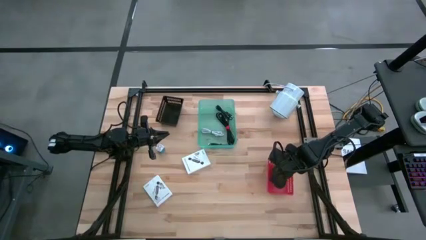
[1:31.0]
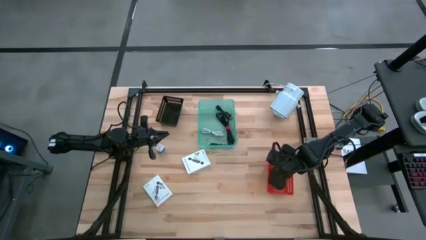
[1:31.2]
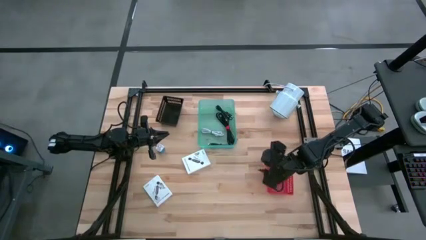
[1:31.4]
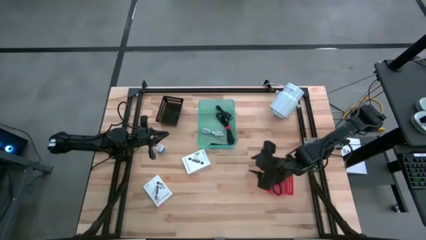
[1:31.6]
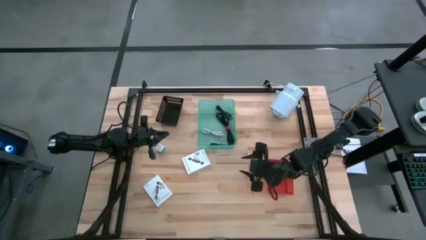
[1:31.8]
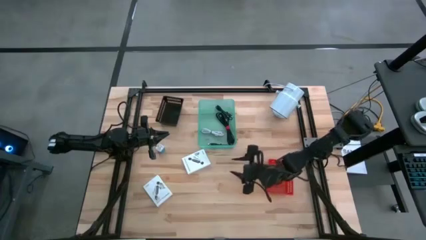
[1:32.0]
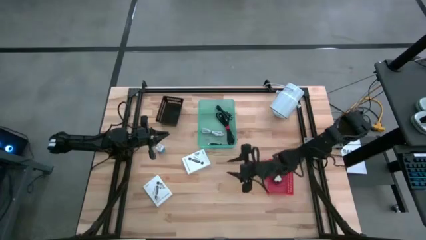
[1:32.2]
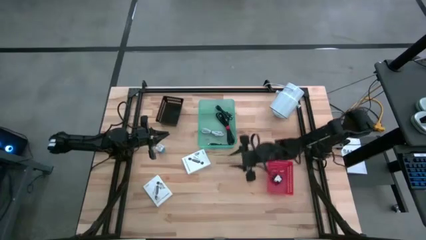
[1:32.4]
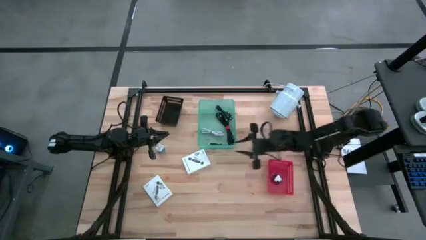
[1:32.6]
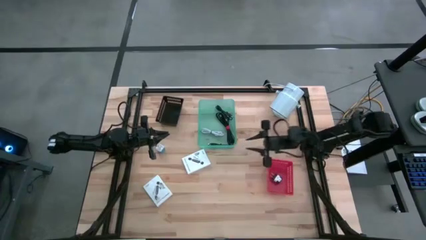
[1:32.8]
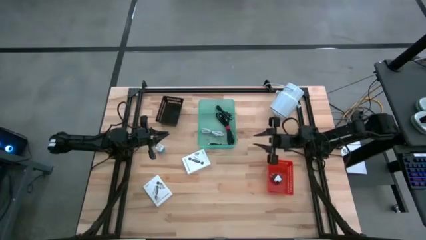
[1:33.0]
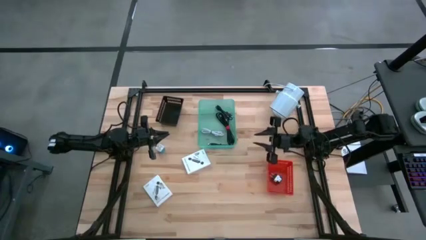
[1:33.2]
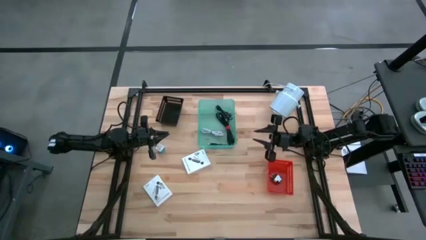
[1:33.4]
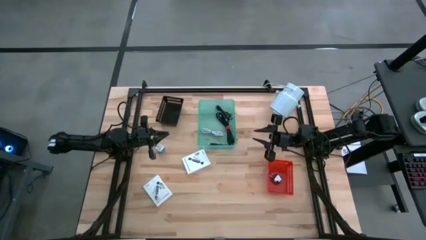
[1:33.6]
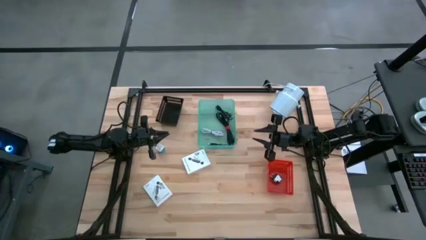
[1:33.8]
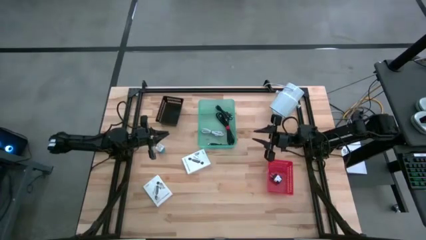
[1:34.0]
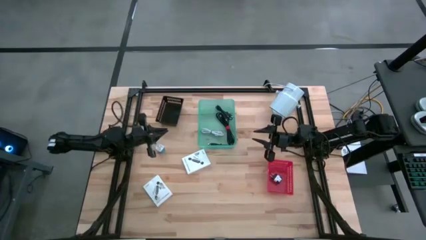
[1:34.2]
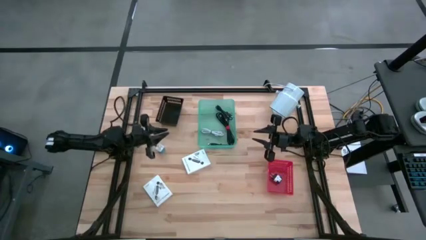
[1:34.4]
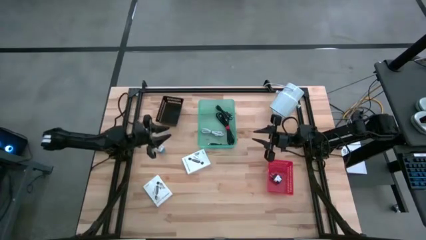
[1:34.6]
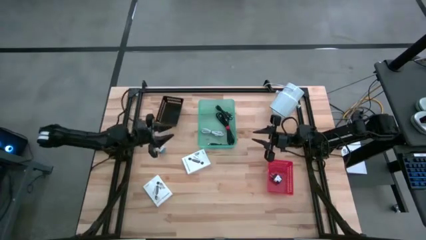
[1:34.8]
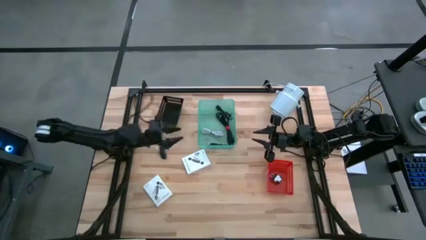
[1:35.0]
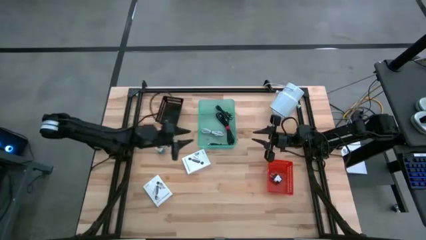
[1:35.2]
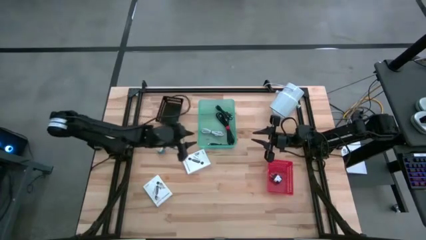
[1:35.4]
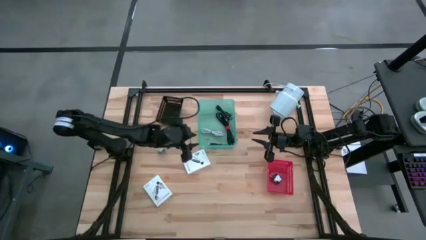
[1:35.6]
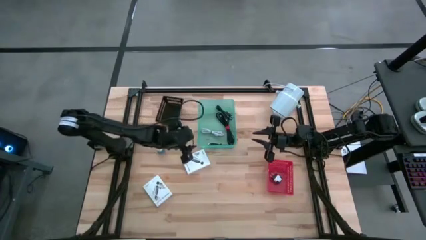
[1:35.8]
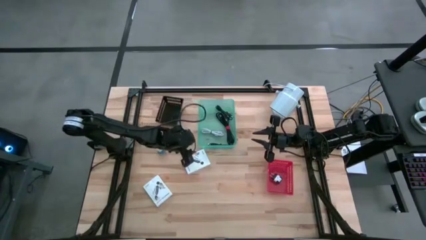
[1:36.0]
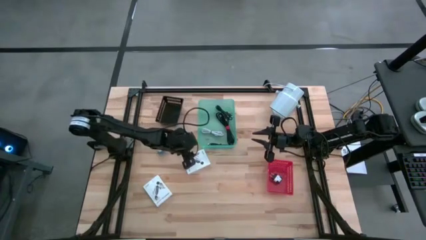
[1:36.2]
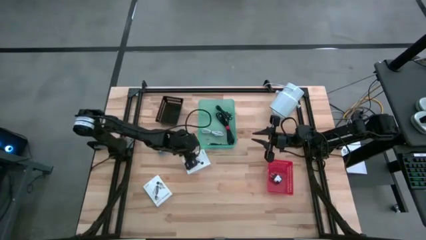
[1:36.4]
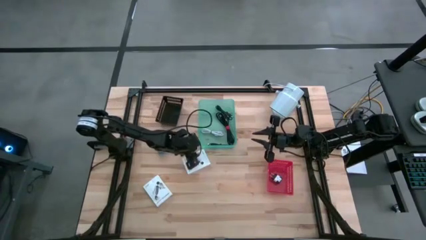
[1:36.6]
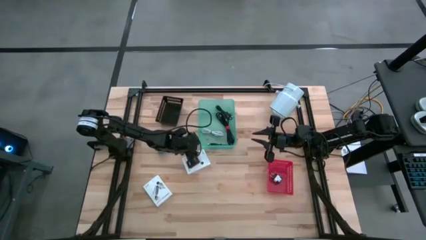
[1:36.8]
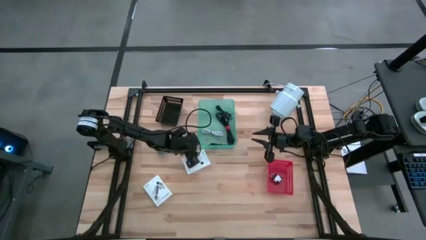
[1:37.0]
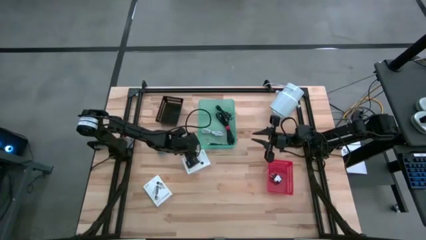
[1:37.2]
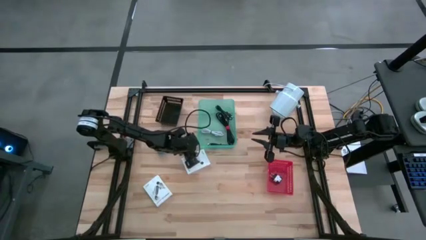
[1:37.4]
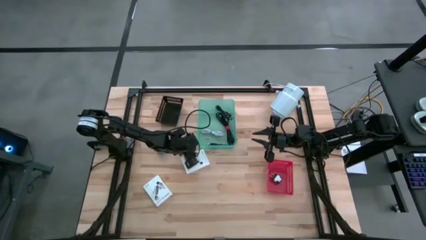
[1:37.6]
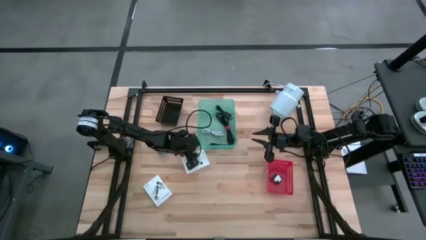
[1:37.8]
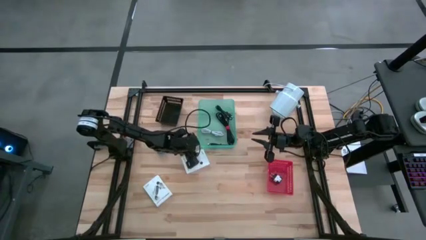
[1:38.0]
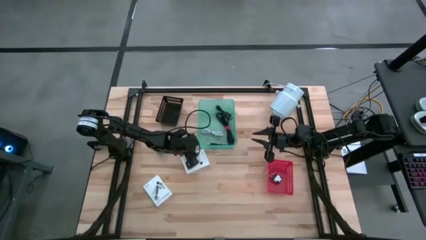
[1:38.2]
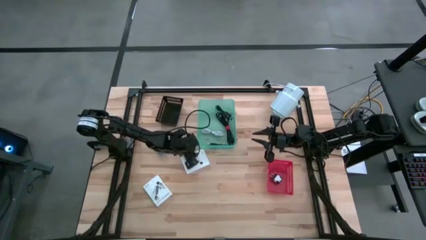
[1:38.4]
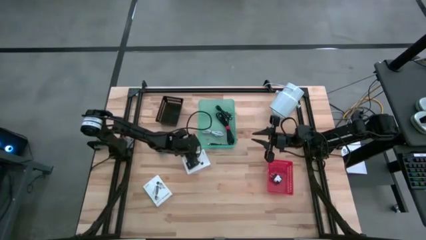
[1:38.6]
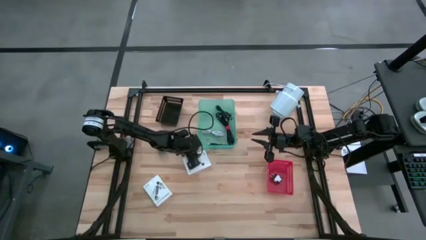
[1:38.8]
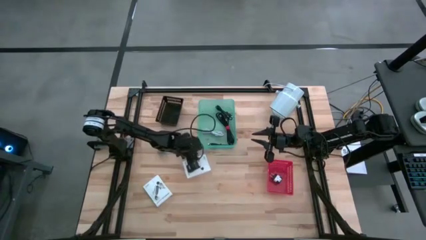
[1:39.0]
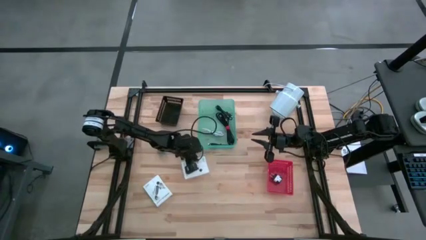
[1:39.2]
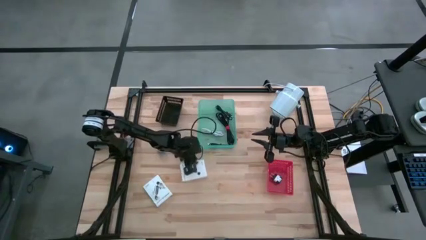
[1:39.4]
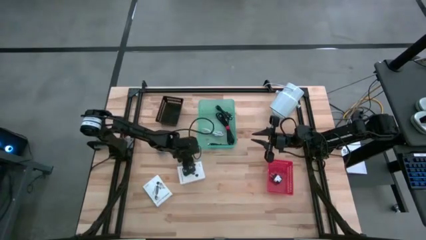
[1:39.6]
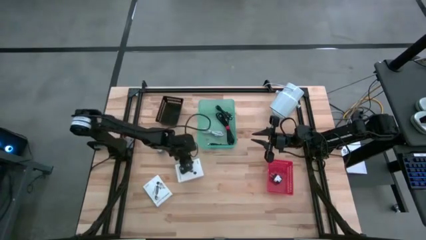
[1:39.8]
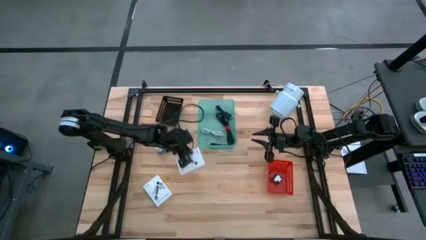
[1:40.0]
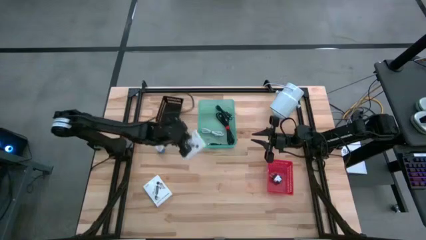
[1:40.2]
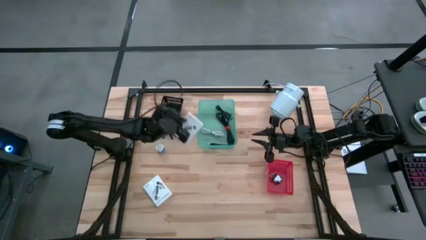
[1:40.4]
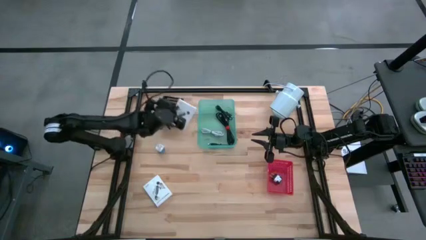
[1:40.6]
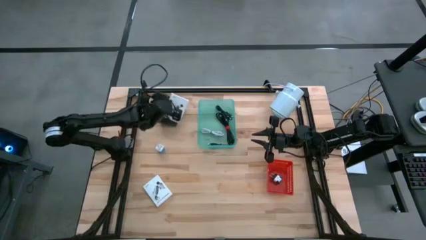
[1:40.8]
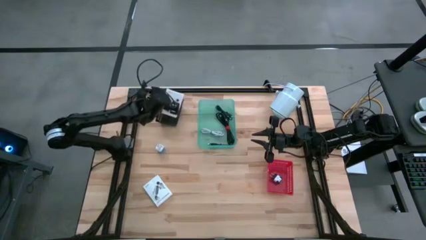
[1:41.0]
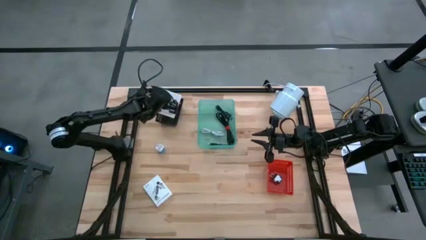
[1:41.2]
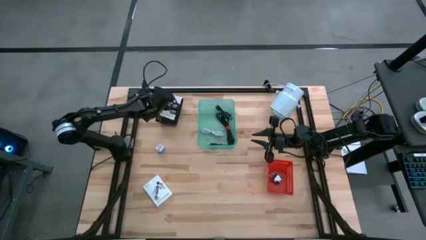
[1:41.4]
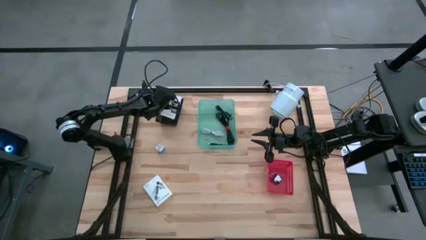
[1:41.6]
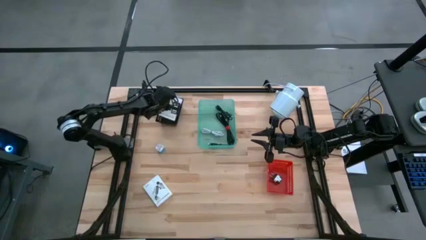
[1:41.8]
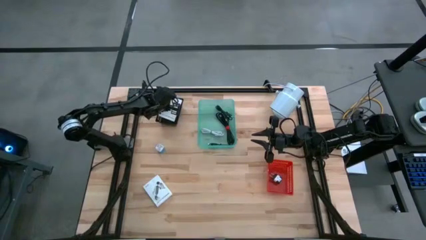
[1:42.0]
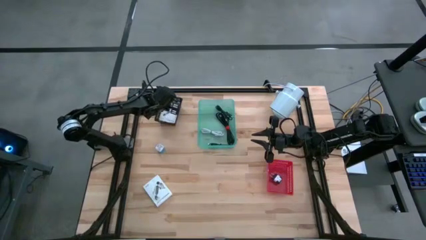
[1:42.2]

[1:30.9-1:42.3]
Task: Pick and place items into bin
Put the top white card reader box into the black bin

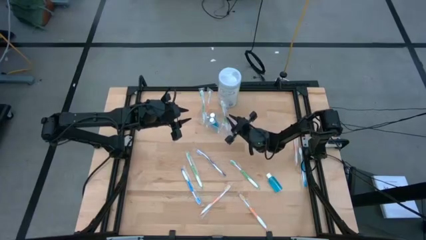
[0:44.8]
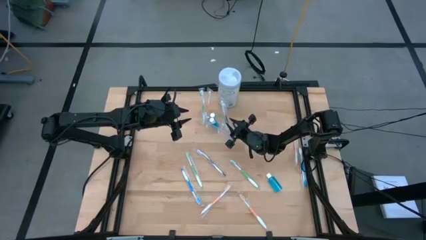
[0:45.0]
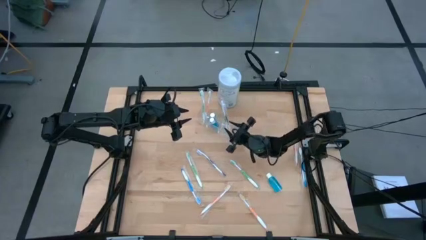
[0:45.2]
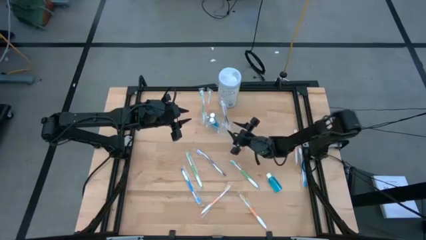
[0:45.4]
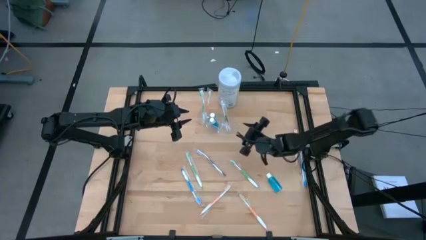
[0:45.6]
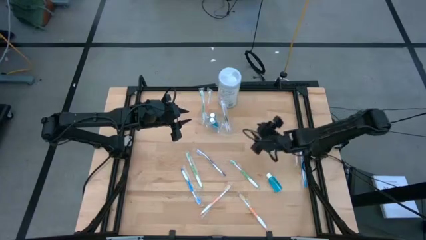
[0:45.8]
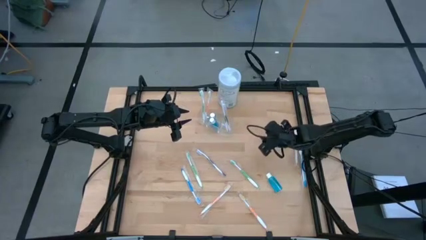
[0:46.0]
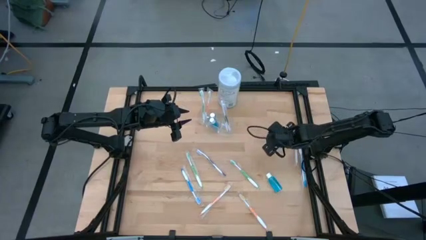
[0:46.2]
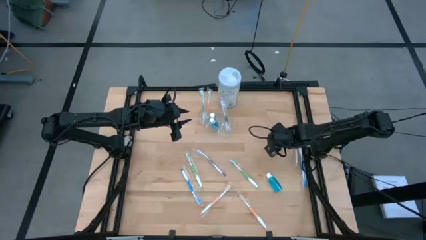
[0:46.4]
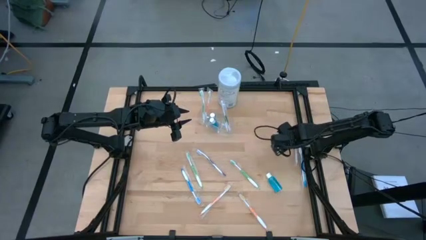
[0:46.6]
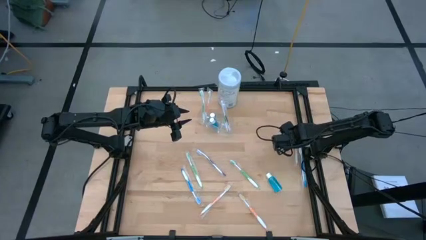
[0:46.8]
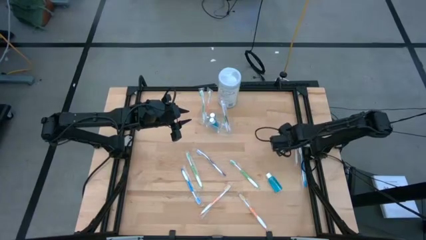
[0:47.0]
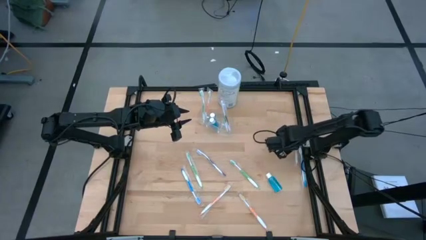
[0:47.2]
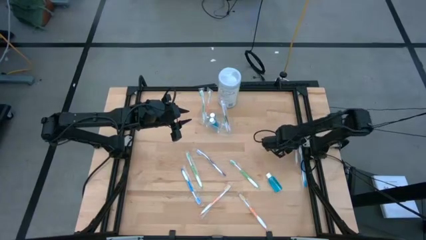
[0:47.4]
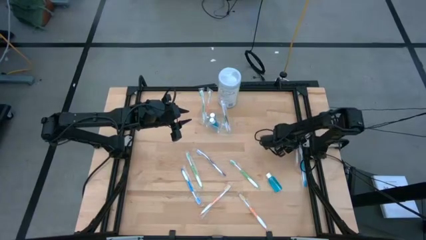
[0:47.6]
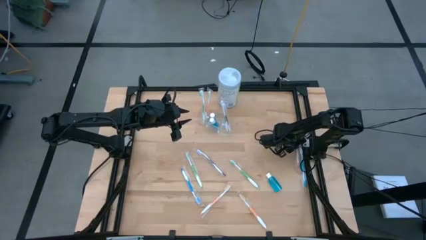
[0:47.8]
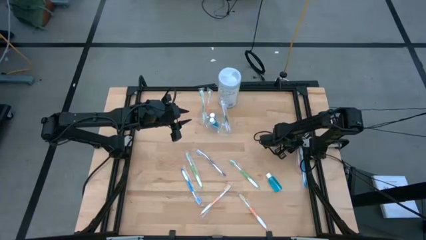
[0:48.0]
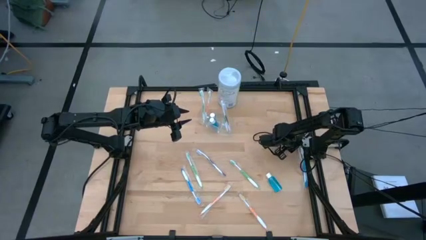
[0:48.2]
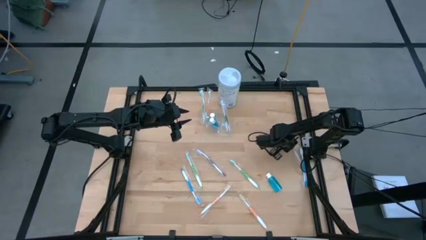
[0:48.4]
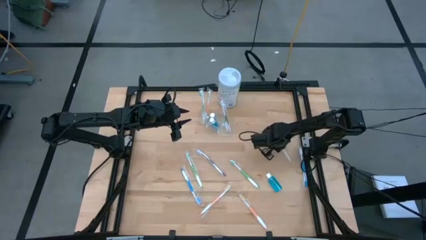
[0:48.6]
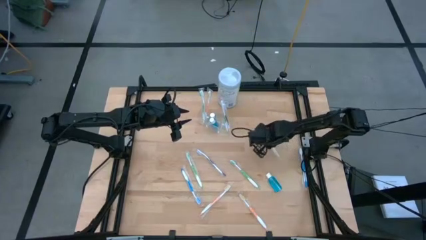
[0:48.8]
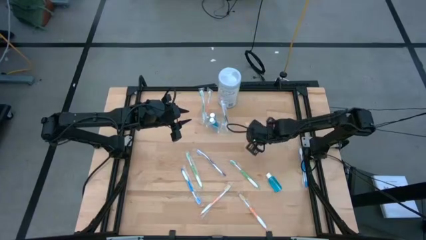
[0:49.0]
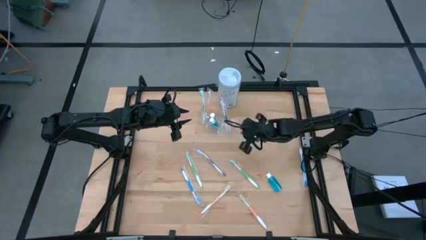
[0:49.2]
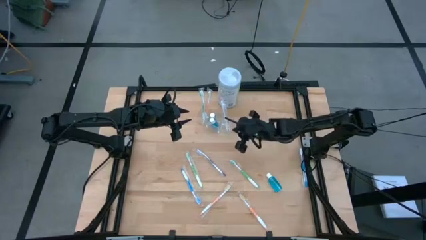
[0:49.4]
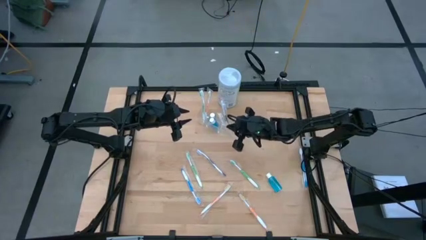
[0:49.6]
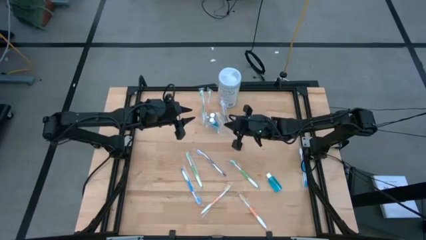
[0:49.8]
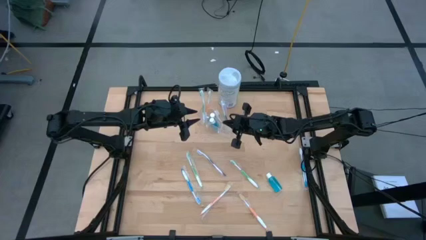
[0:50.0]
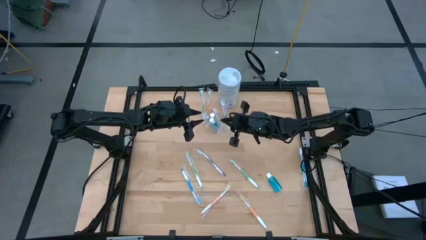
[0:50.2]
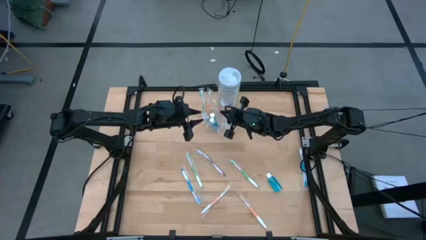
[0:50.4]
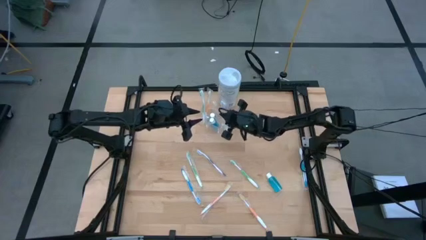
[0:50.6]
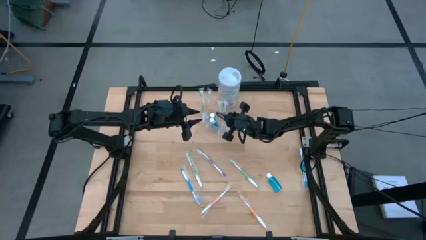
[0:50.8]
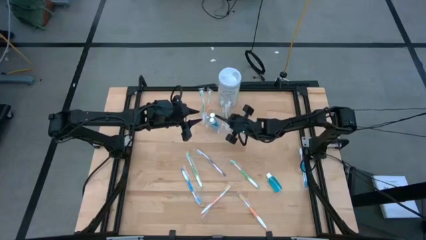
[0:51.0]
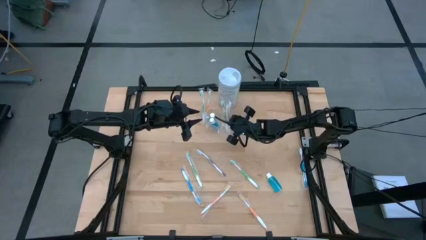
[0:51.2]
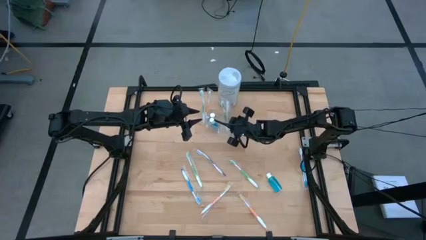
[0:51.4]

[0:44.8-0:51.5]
Task: Pick & Place toothbrushing station
Put the orange toothbrush into the transparent organizer
